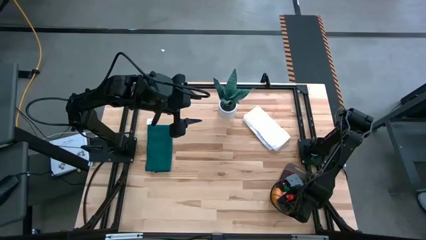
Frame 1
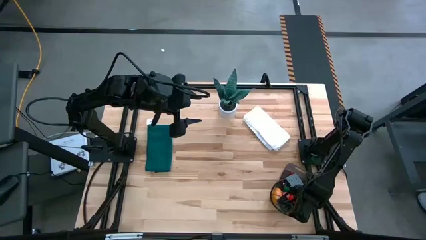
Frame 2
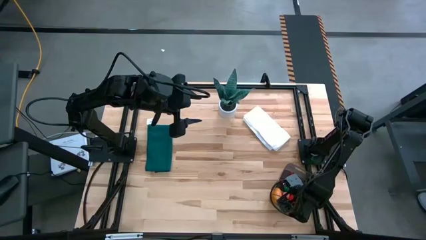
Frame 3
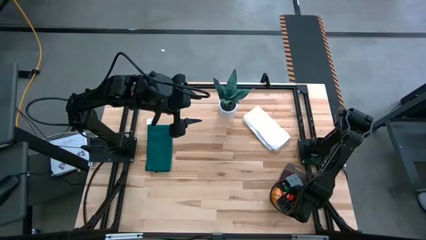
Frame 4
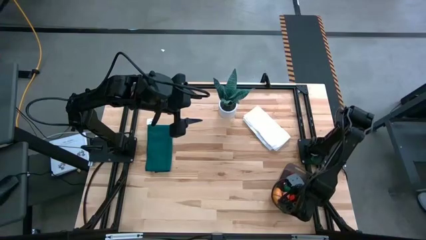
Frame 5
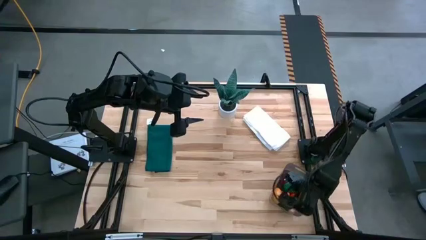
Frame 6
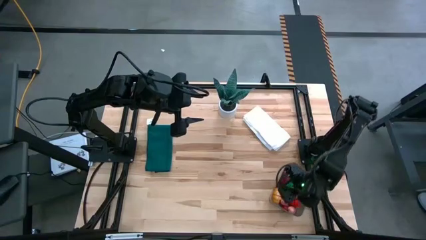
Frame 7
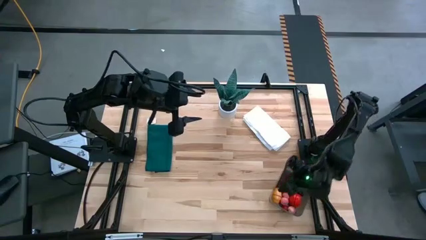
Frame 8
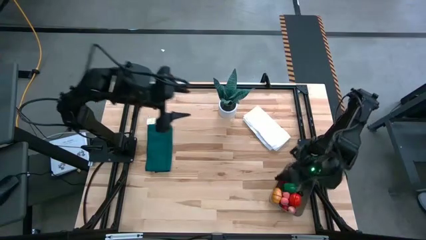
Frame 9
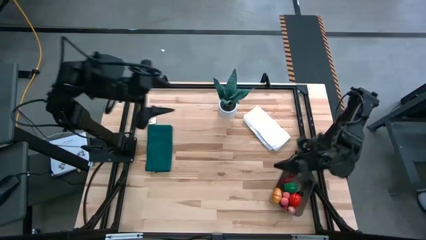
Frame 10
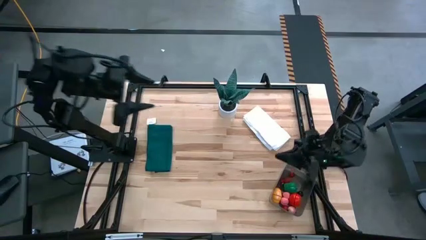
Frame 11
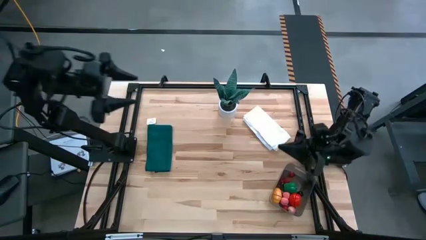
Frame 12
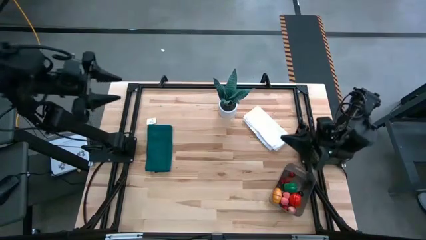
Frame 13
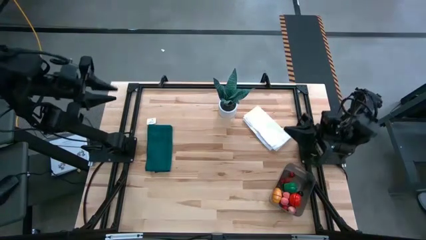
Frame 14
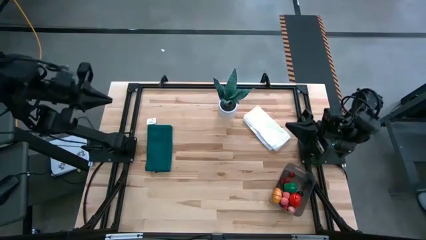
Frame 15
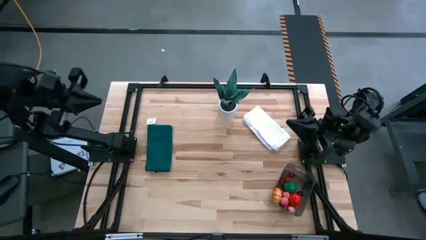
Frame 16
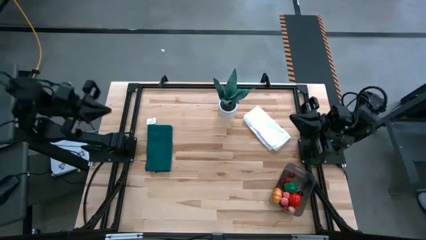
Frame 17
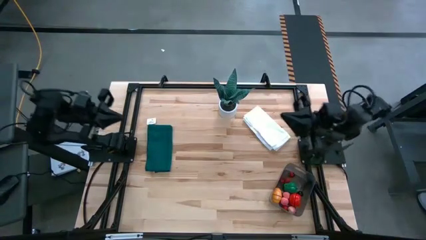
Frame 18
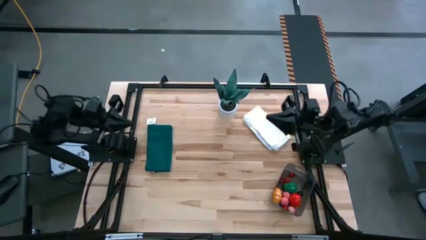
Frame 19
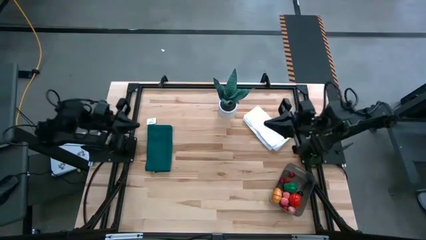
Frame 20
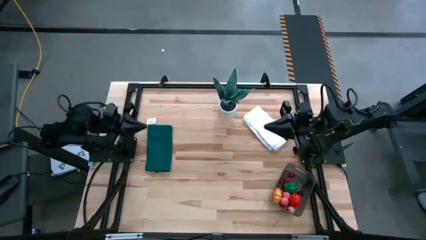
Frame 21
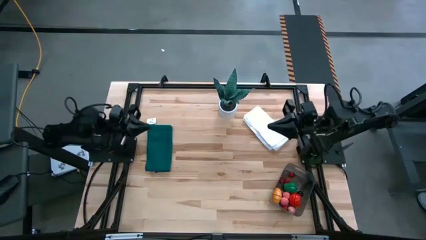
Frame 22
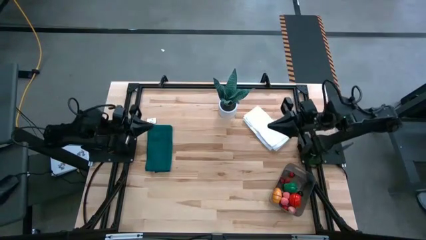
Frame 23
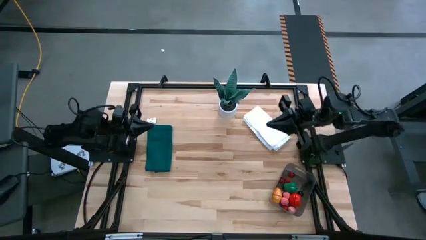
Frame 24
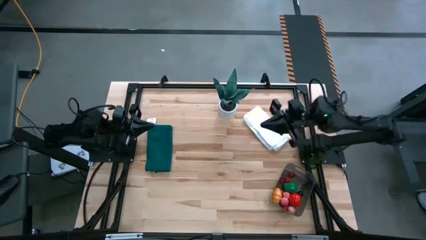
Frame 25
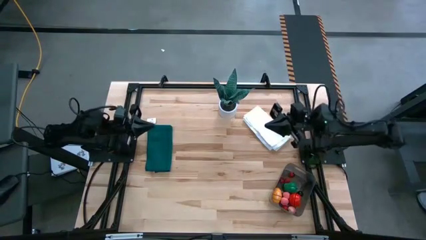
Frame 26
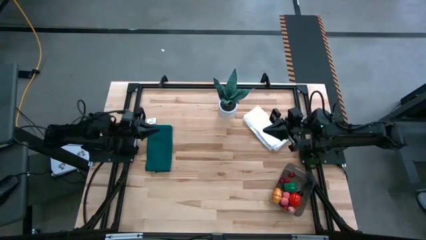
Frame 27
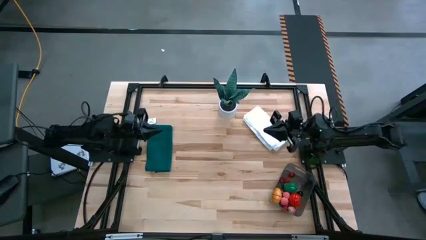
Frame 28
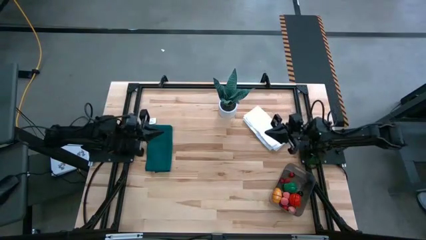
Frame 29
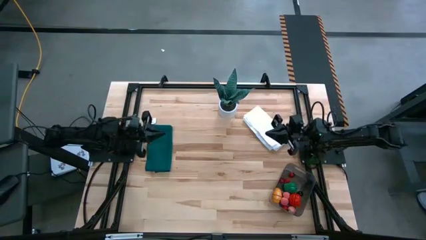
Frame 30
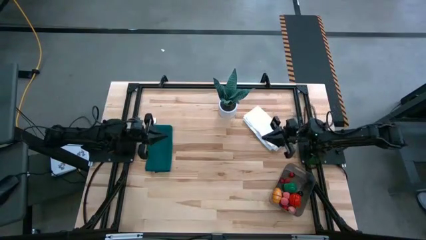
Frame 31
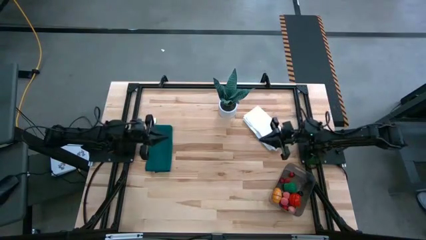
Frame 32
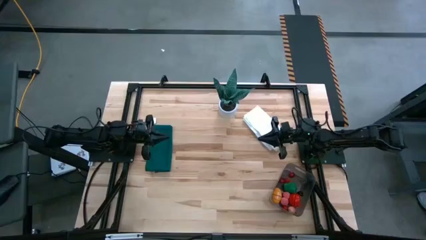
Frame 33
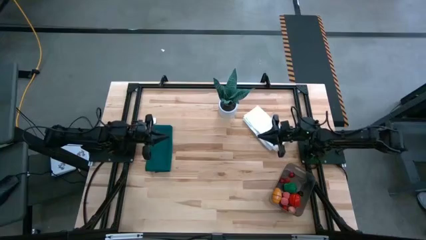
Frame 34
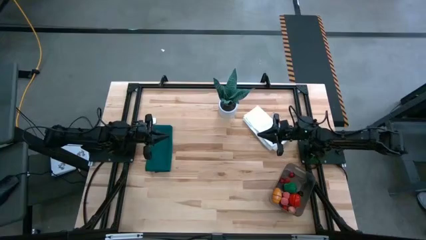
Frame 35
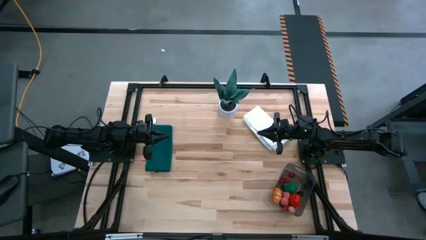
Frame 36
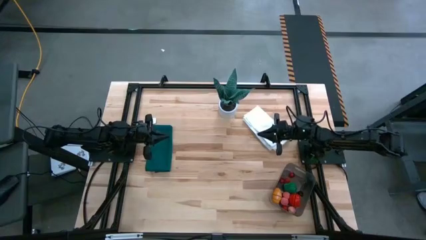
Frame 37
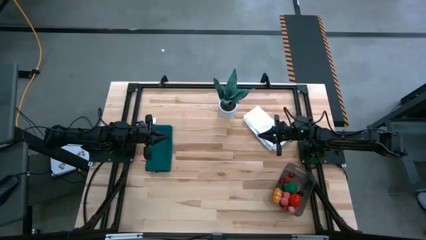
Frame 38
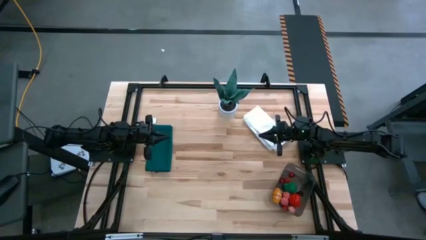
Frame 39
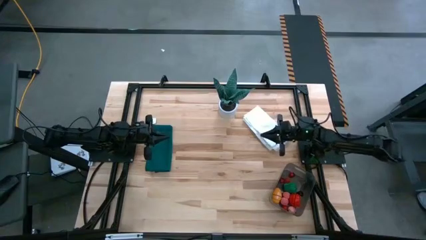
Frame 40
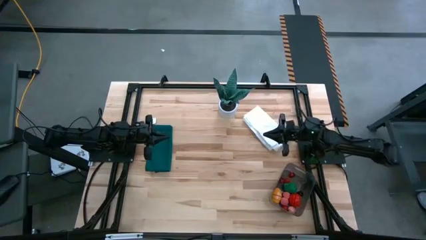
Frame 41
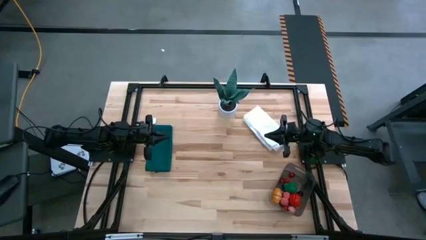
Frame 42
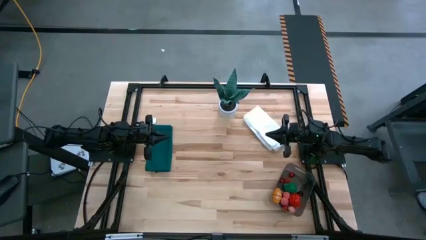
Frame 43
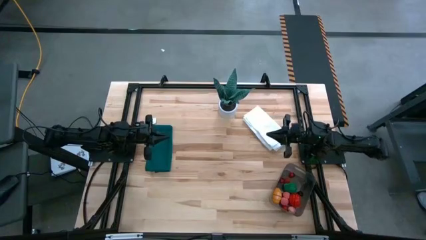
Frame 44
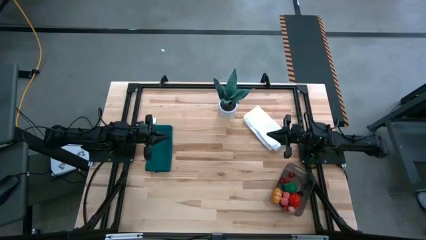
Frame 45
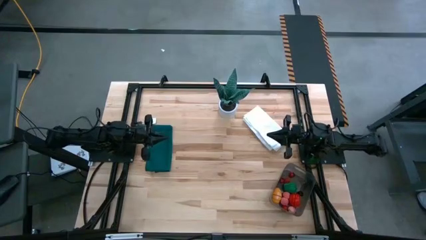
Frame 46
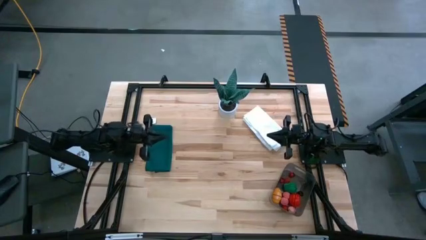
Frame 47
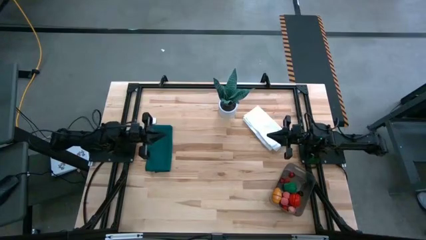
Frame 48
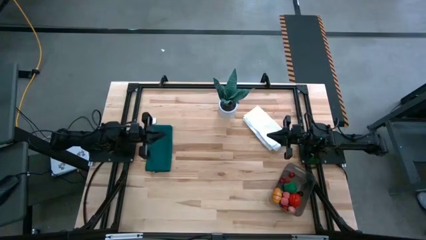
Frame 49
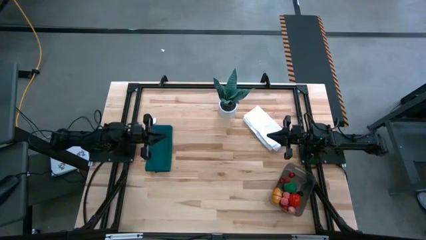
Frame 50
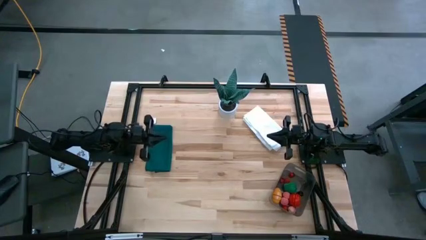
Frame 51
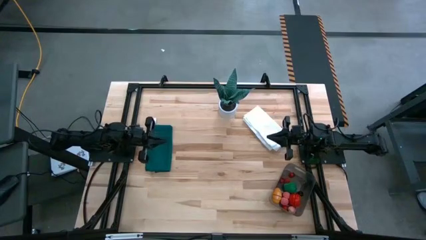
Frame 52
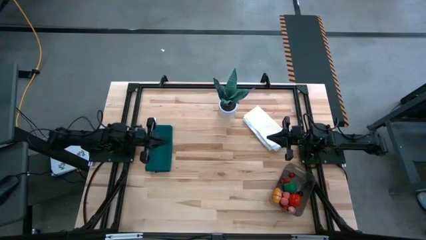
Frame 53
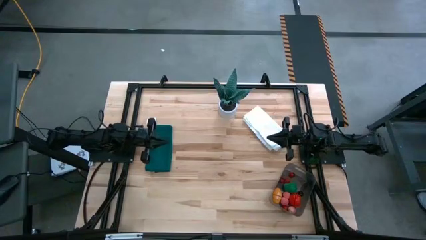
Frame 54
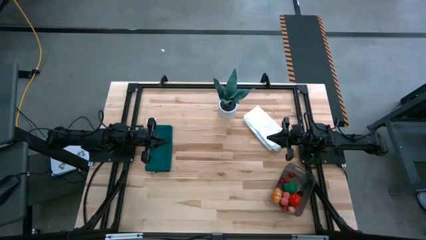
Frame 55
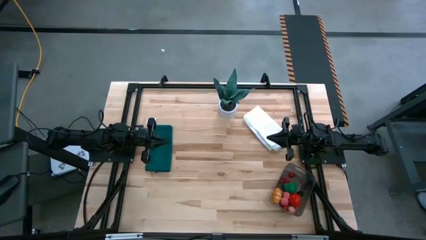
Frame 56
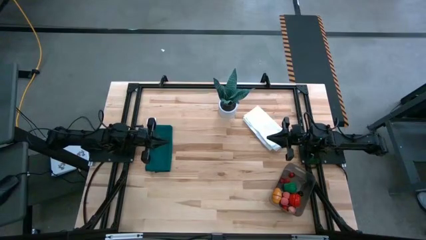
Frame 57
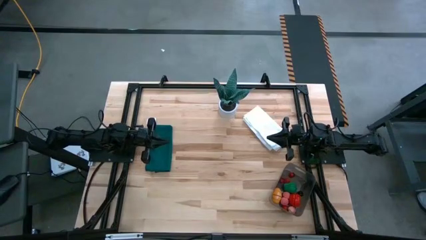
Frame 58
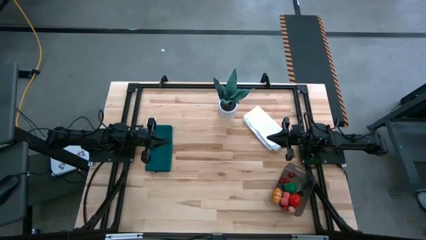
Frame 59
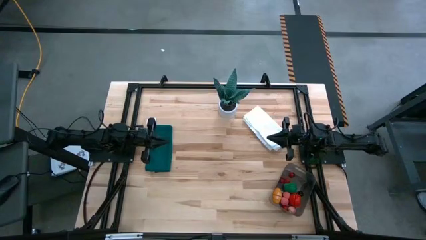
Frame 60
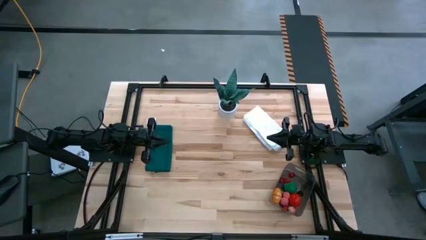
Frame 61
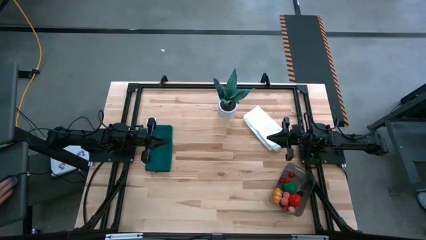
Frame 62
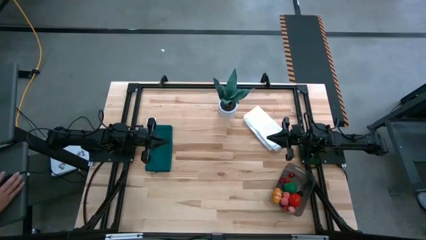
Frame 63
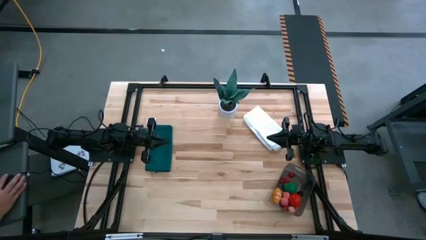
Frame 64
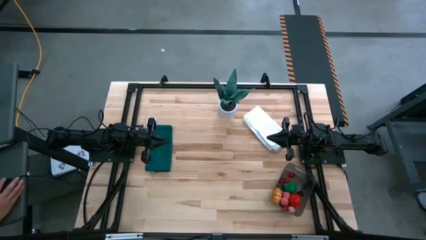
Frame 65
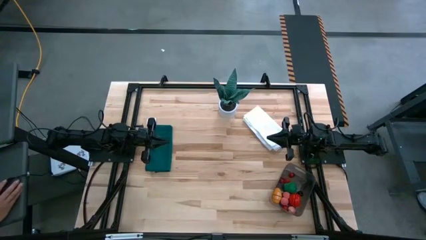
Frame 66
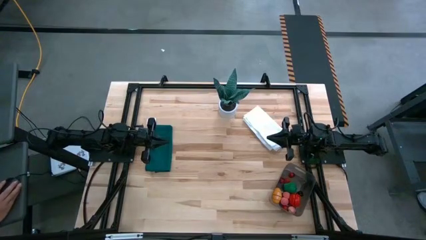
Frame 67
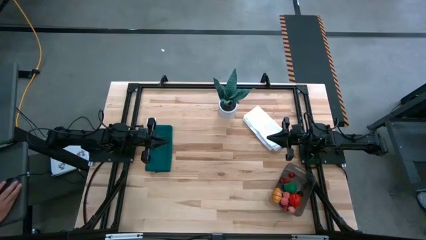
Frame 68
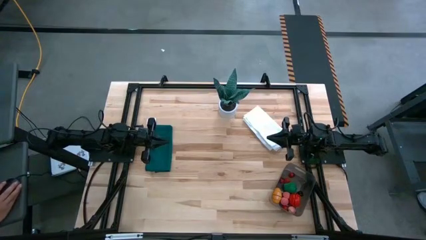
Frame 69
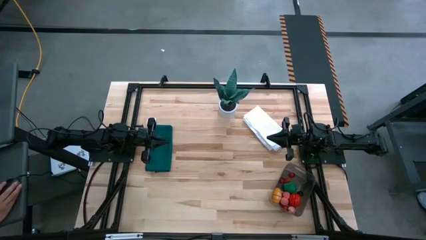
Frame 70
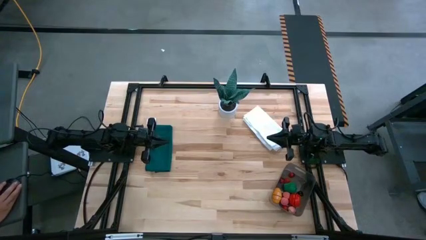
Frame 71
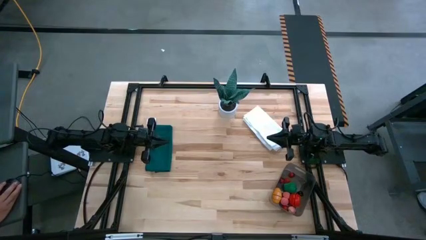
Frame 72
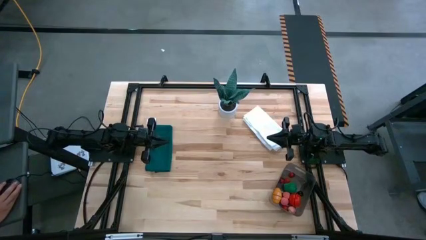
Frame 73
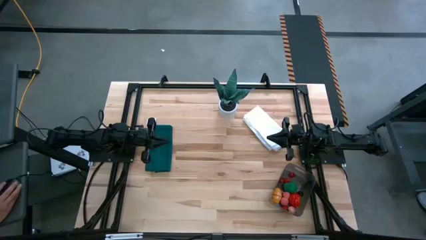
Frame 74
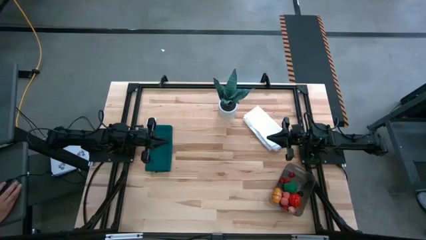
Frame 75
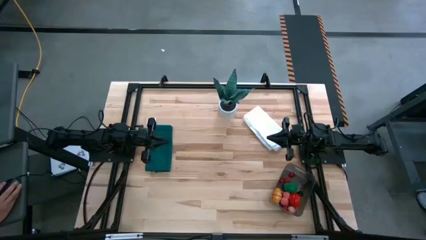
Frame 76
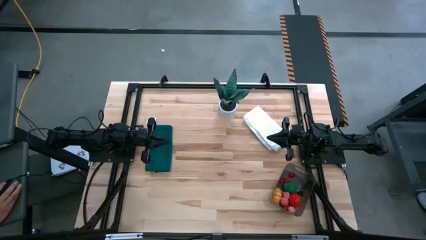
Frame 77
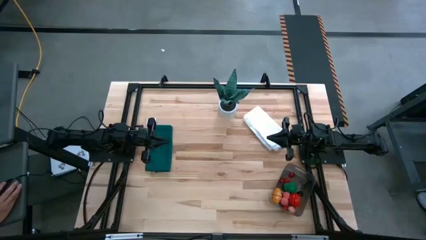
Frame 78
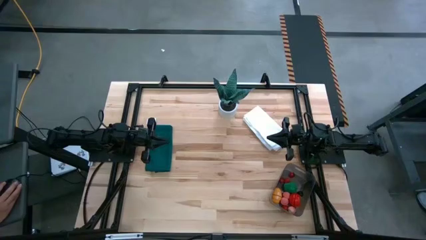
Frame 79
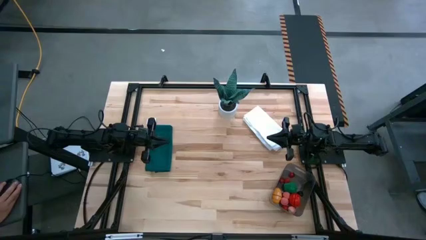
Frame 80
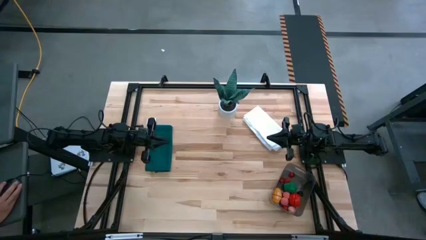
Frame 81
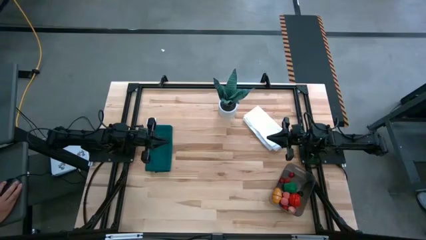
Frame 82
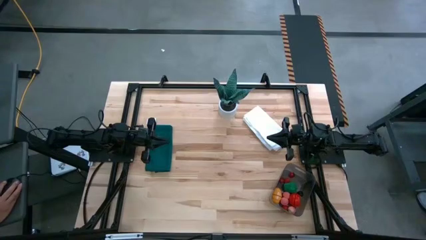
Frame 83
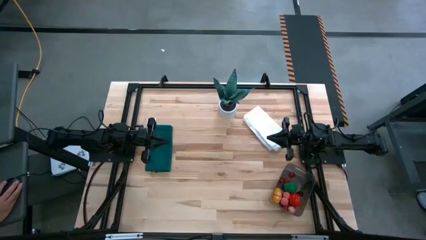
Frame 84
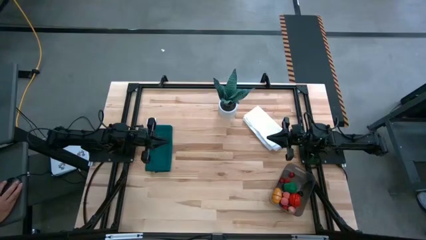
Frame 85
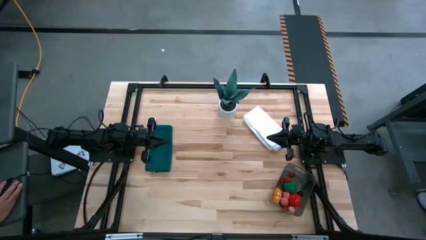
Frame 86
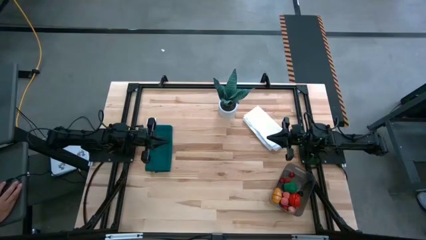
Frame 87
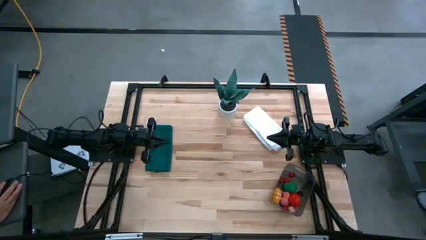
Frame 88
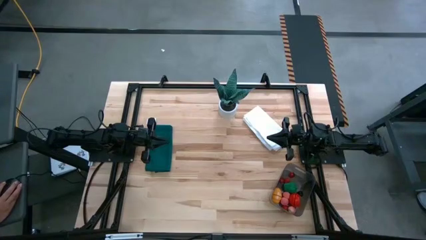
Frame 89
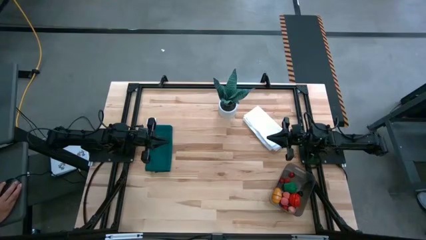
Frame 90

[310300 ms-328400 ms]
Task: Pick and placing Produce into tupperware
Return to home position
